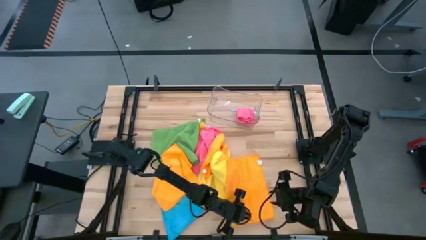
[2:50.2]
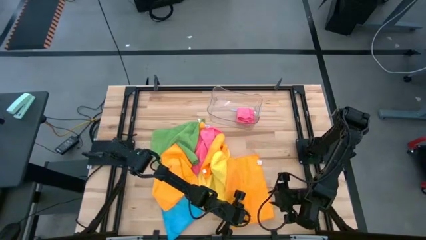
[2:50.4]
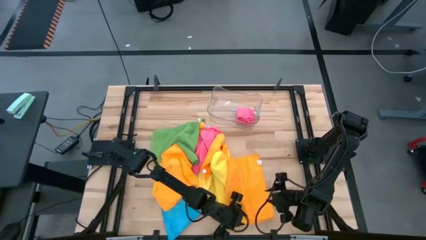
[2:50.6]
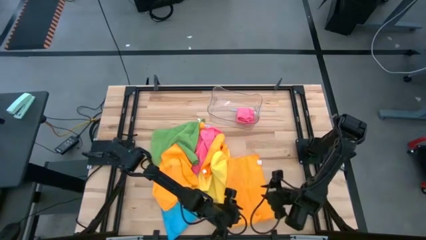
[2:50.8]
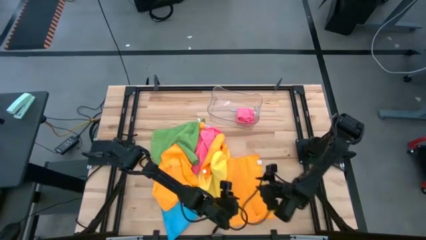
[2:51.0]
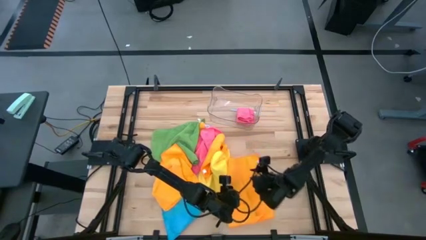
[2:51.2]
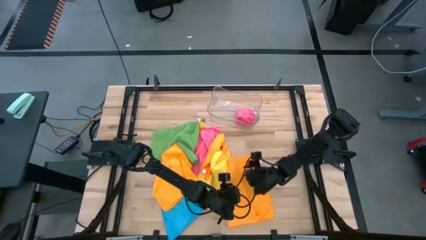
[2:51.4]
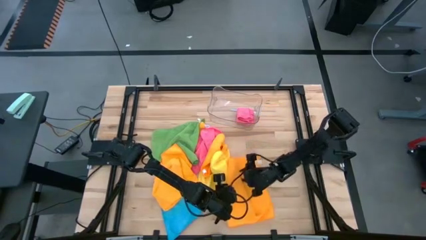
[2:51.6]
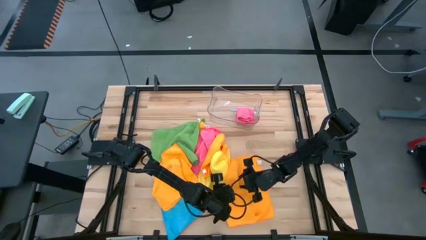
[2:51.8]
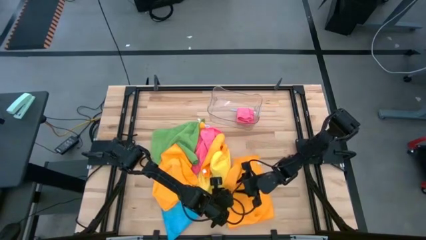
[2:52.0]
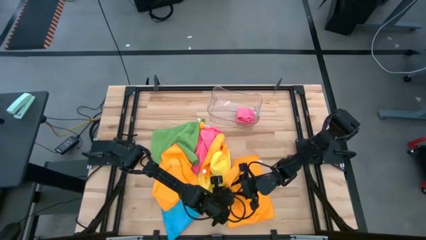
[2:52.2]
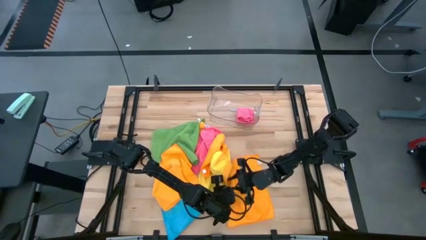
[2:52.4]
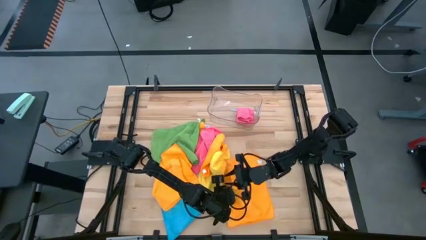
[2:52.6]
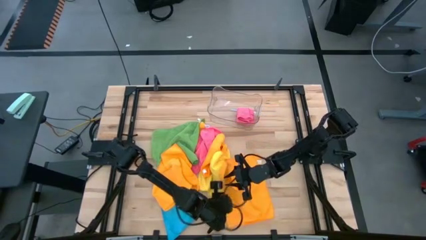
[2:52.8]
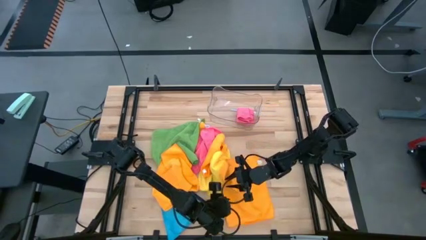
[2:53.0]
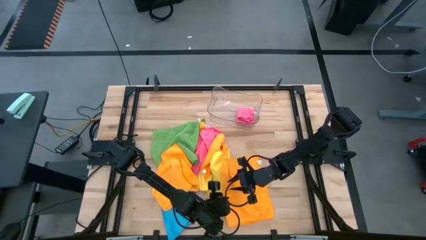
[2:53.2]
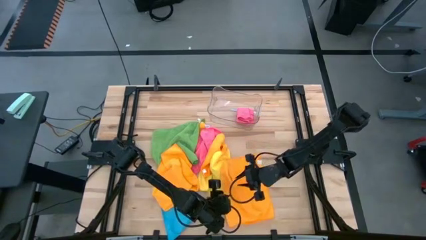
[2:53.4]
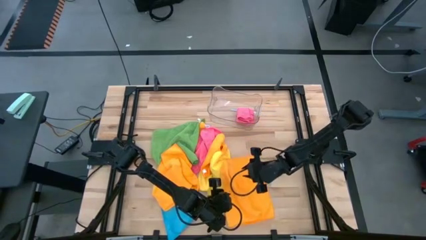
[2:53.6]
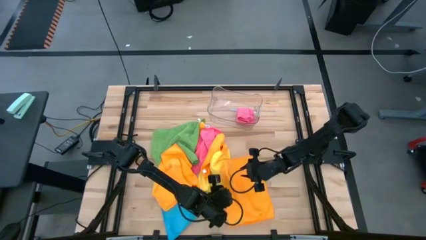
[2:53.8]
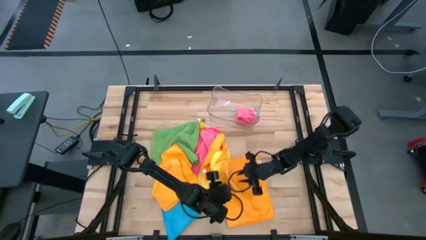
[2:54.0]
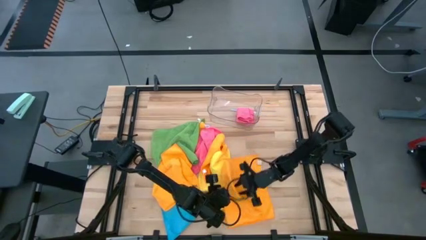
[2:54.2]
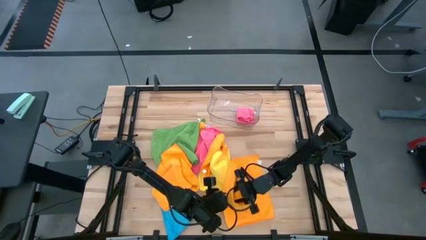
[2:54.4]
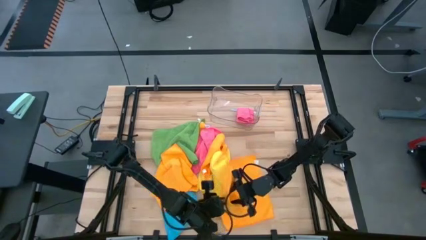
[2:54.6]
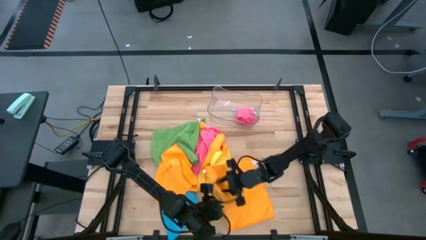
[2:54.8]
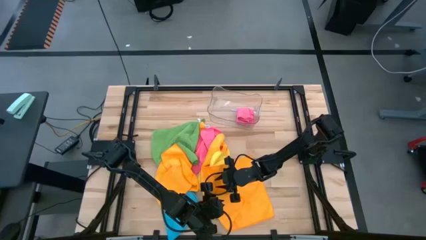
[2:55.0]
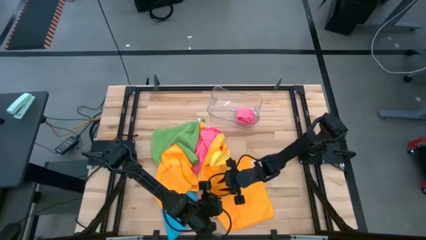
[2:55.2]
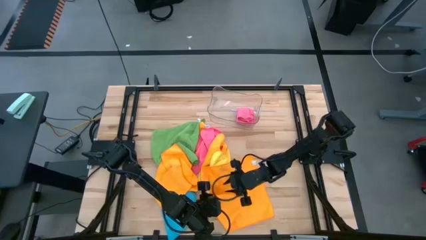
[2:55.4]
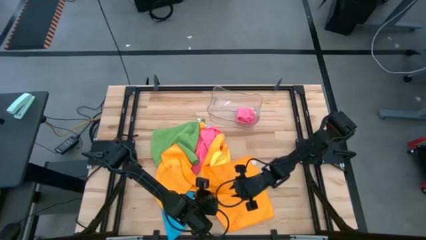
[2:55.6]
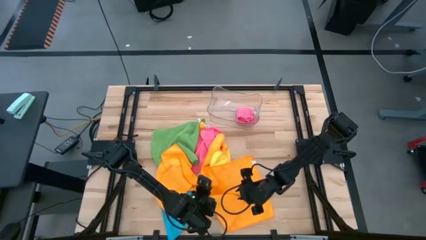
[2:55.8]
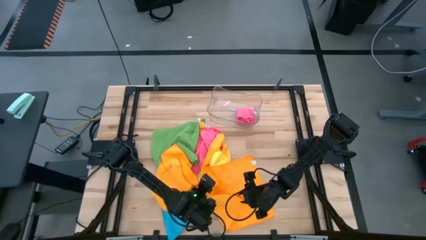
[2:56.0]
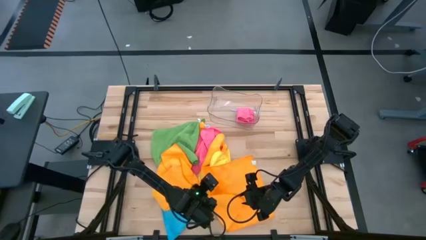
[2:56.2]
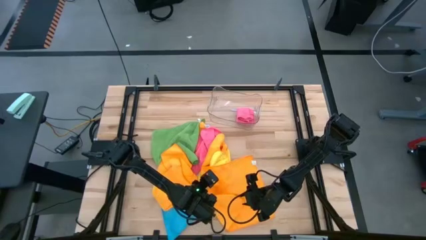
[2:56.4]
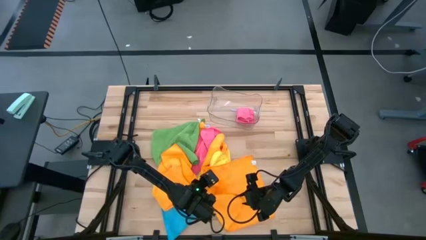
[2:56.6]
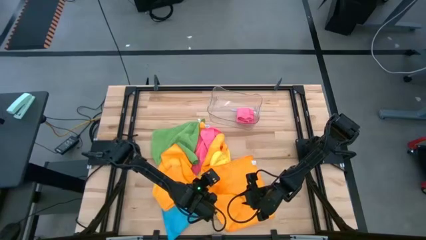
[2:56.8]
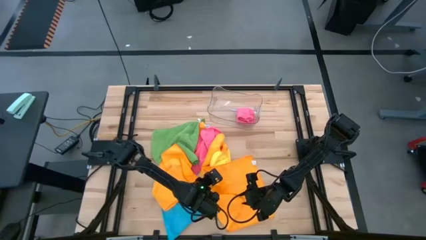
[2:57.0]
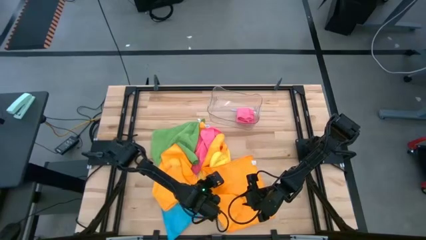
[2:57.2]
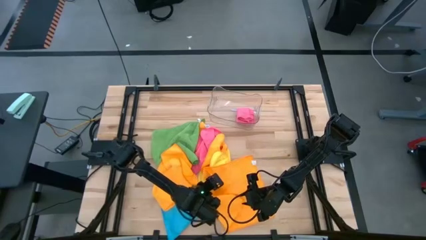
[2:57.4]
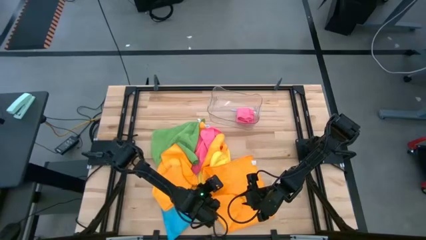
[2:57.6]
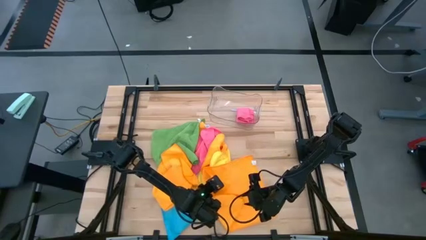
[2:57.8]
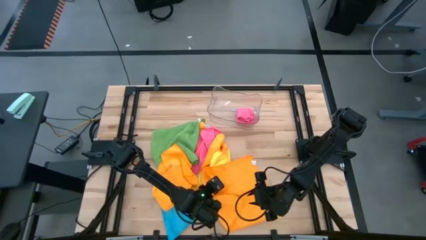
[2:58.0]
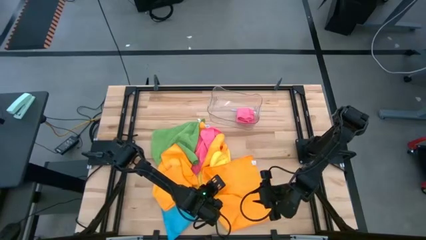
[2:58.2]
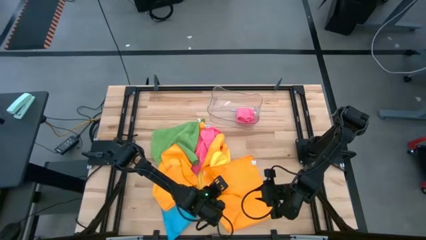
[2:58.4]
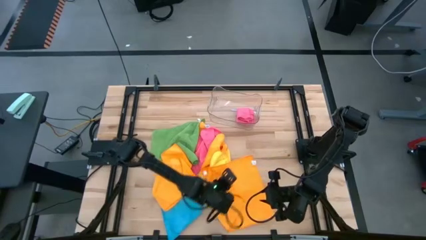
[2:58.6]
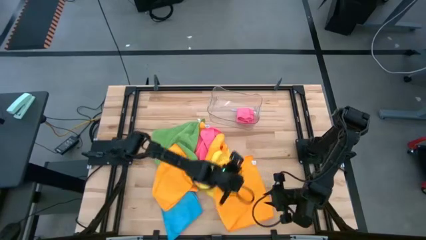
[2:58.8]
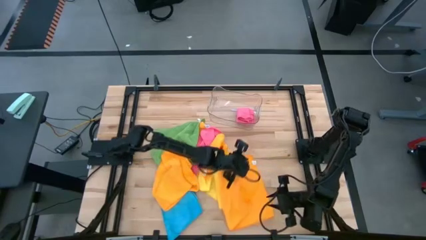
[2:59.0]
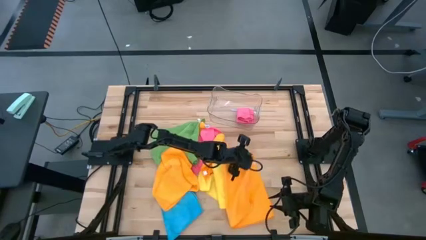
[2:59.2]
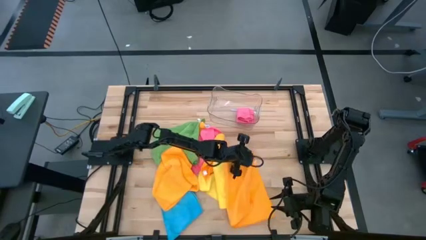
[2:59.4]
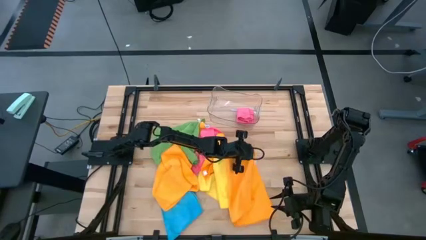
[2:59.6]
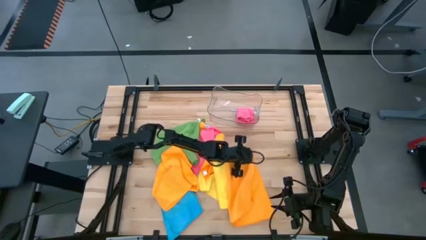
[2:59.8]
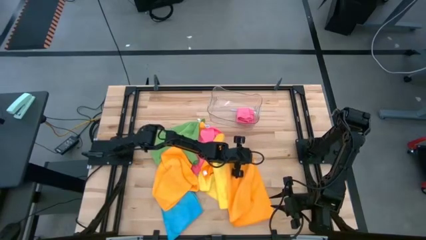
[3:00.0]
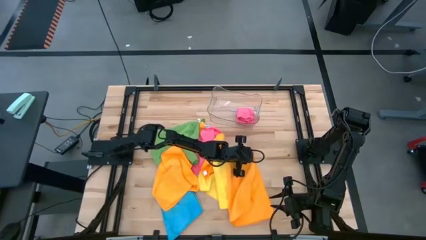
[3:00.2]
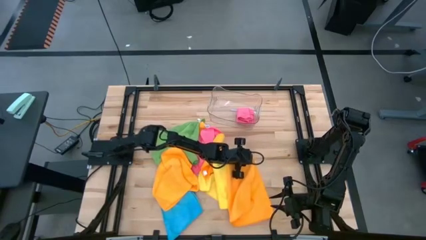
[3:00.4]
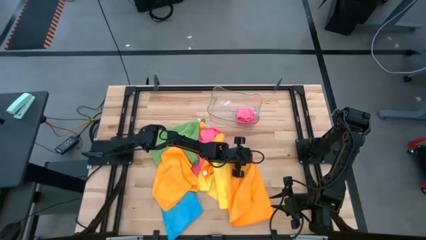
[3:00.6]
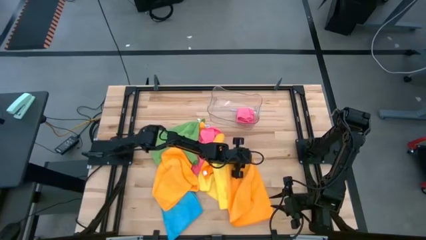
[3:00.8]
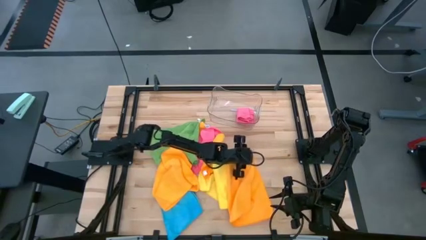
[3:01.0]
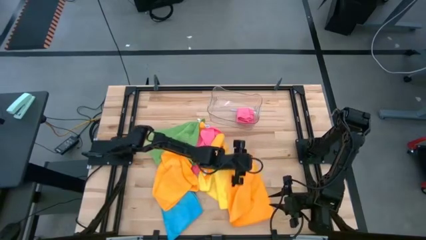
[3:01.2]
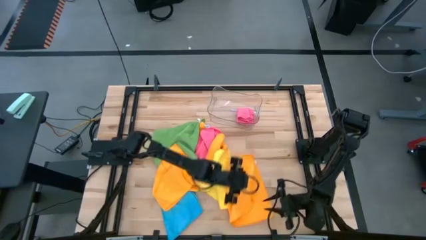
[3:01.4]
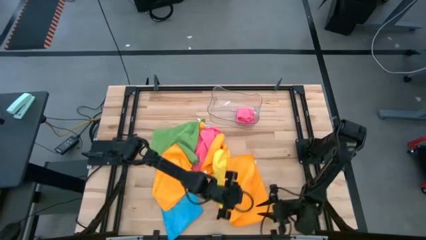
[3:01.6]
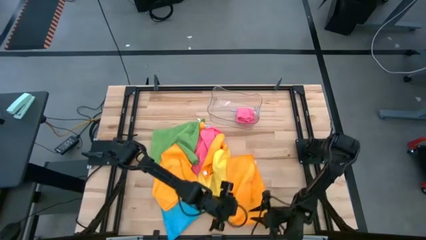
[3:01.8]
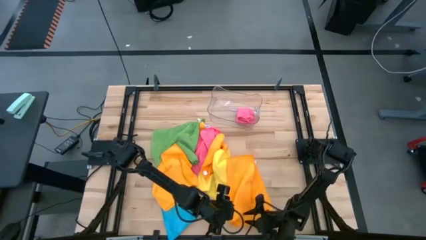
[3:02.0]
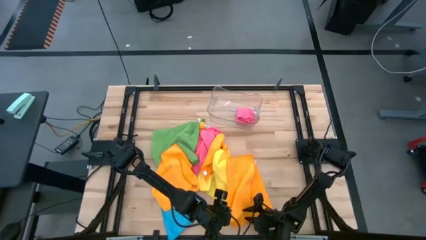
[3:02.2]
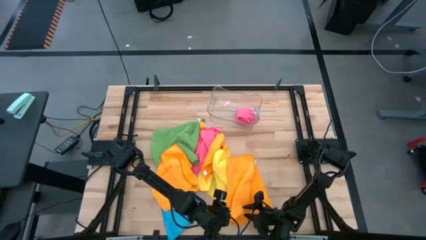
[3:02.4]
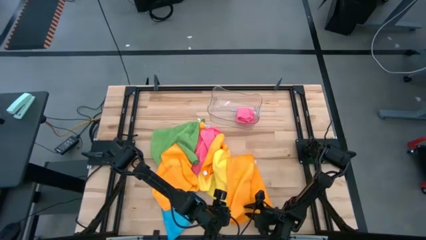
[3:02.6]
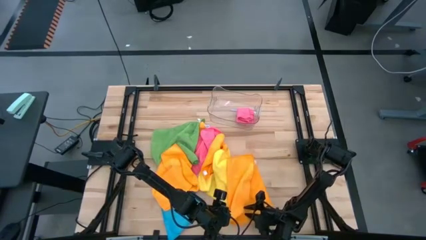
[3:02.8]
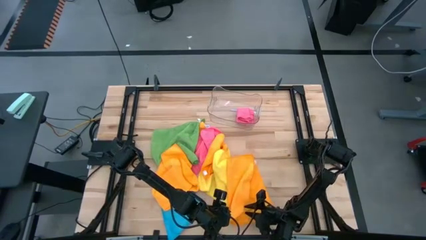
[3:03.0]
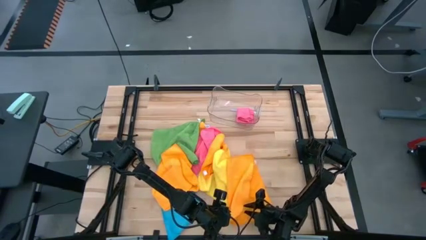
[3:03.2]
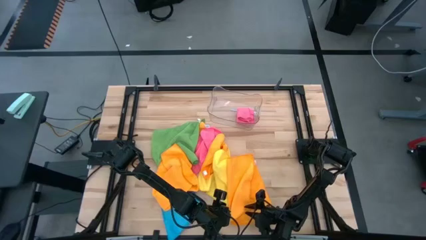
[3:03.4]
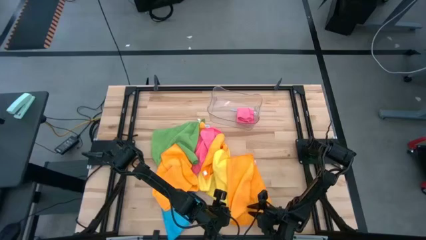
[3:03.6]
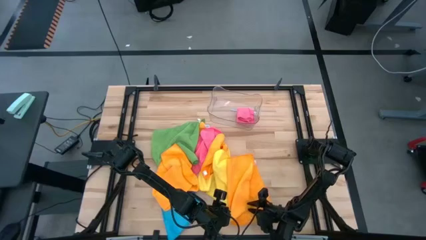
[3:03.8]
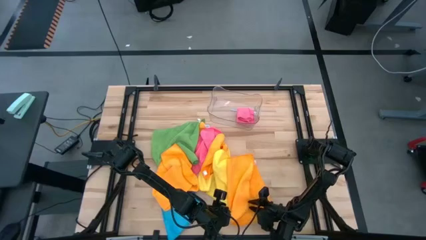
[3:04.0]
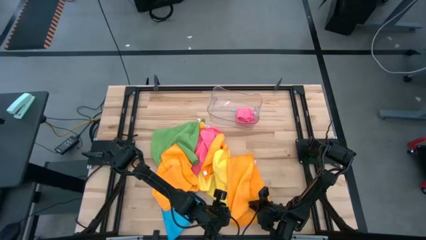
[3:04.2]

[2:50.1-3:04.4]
Task: Fold microfiber towels
Fold the right orange microfiber cloth

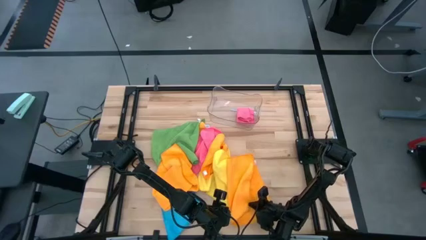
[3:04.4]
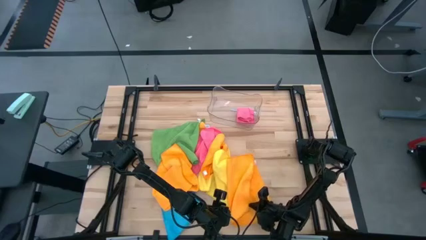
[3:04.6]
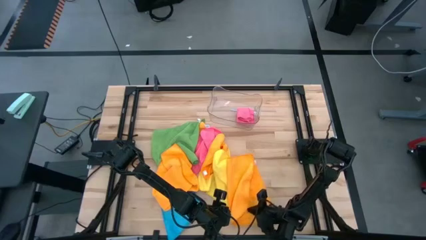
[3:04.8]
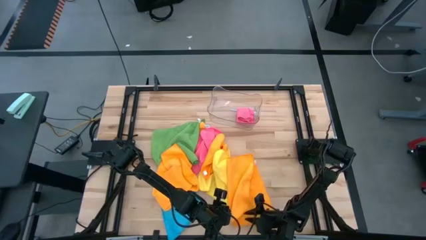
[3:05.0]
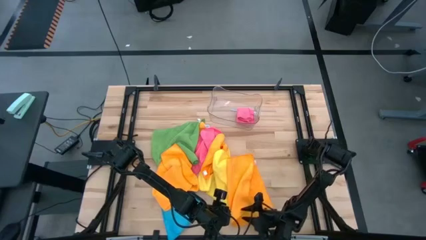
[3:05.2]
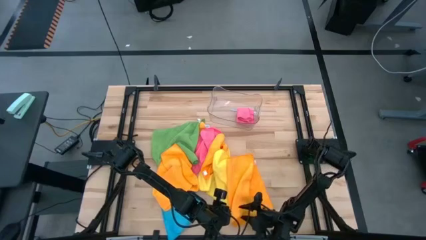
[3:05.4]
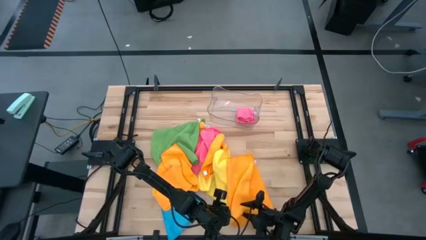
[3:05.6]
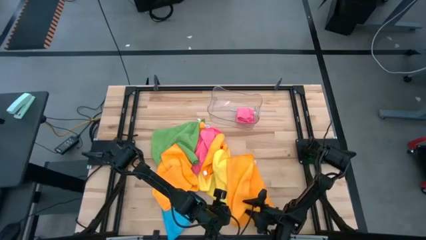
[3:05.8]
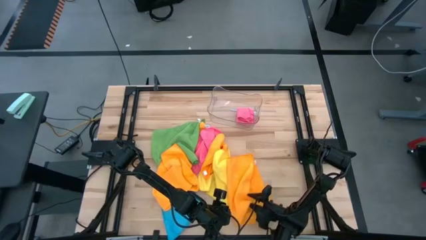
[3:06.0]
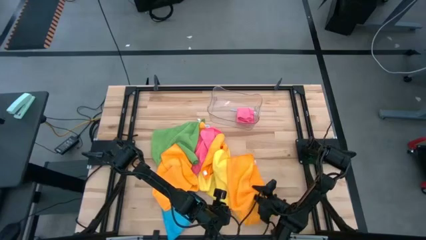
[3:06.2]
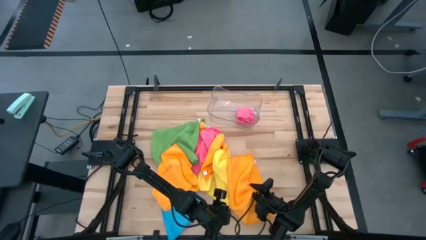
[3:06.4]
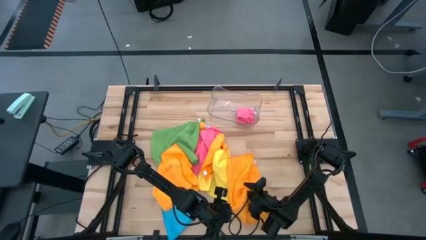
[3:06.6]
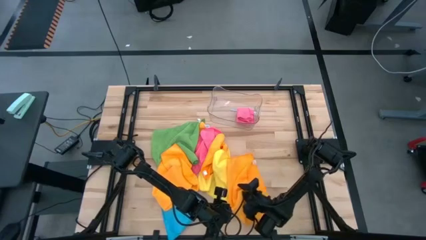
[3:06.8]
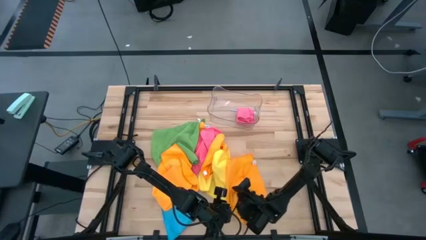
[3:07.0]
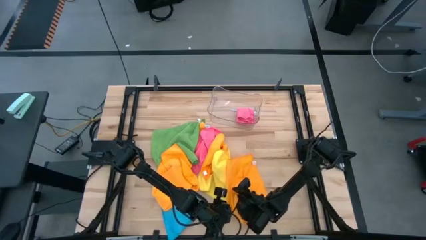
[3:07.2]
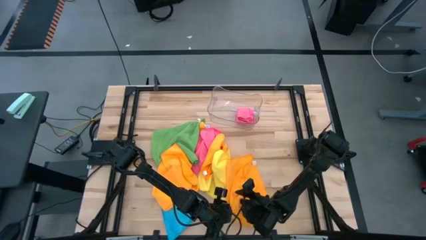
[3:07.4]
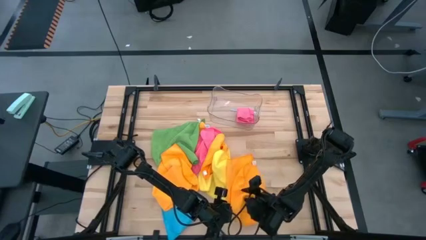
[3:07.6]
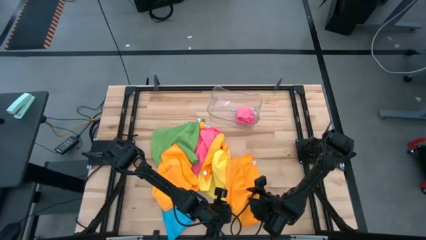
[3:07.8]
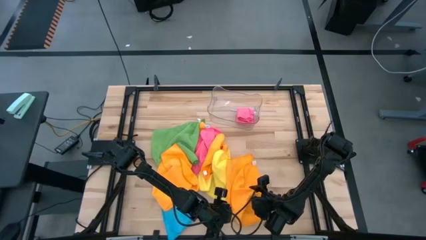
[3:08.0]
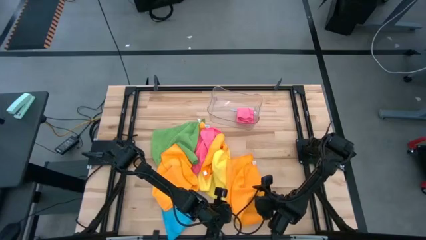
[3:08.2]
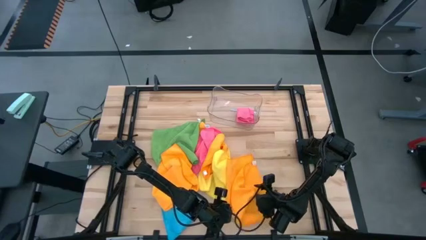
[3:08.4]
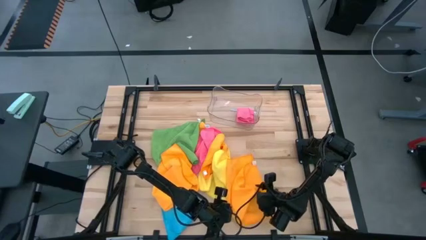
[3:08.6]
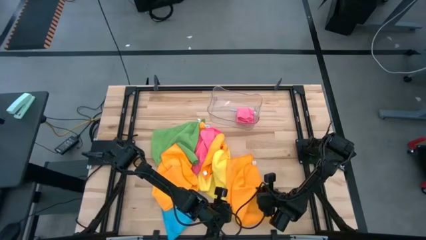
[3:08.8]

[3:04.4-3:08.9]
Fold the right orange microfiber cloth
